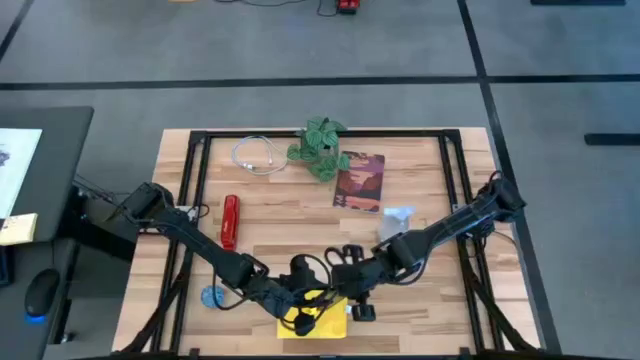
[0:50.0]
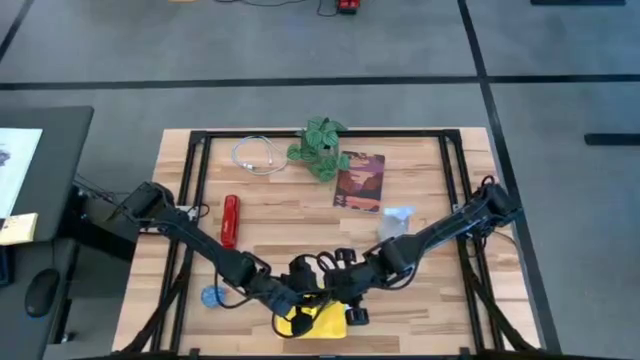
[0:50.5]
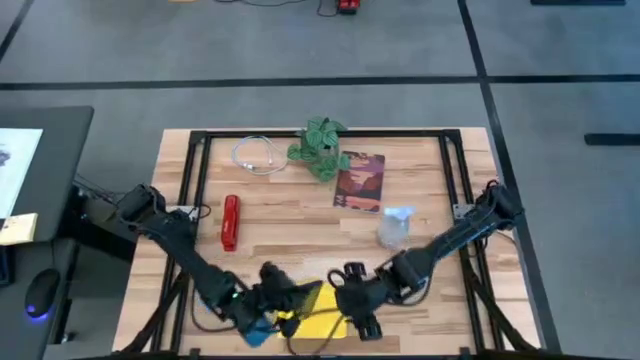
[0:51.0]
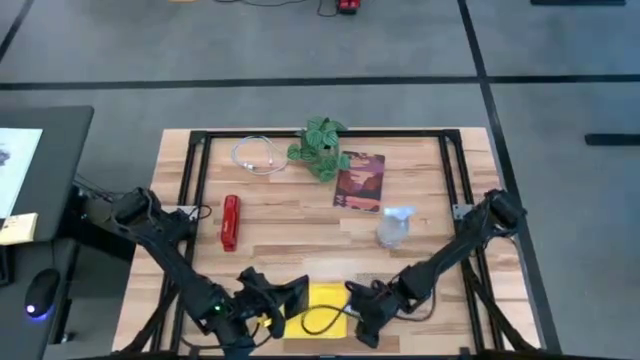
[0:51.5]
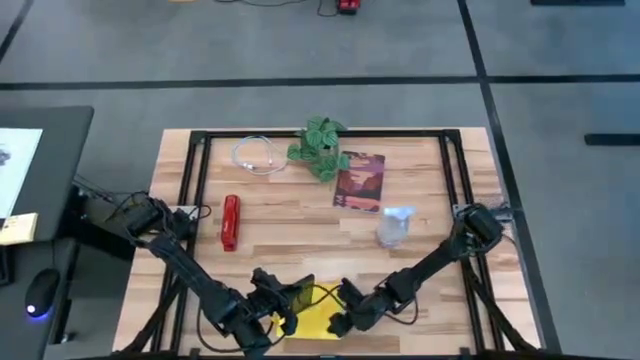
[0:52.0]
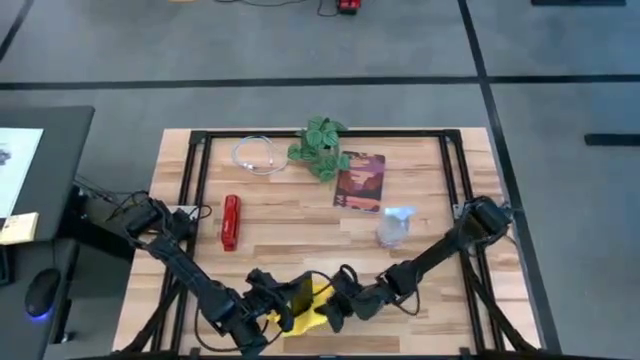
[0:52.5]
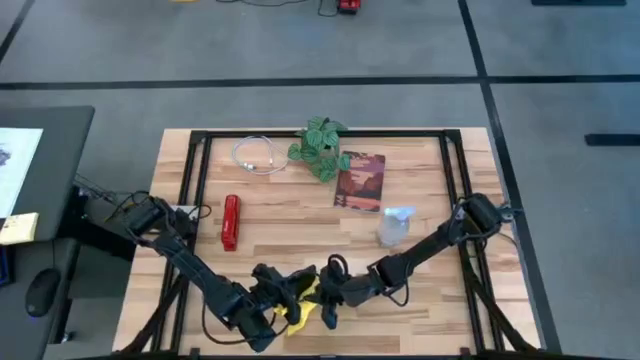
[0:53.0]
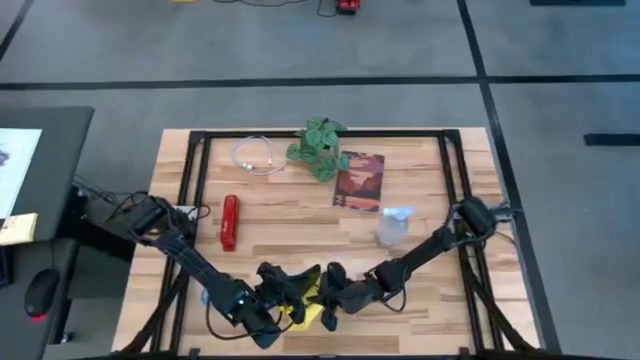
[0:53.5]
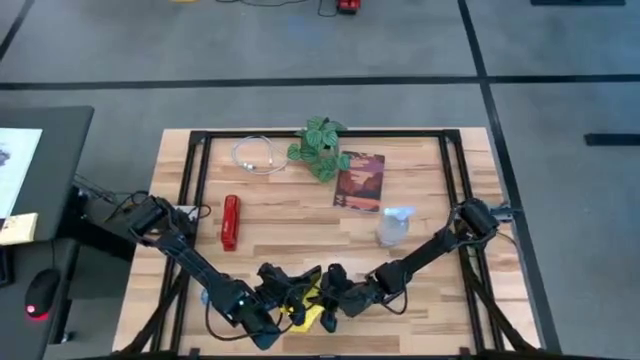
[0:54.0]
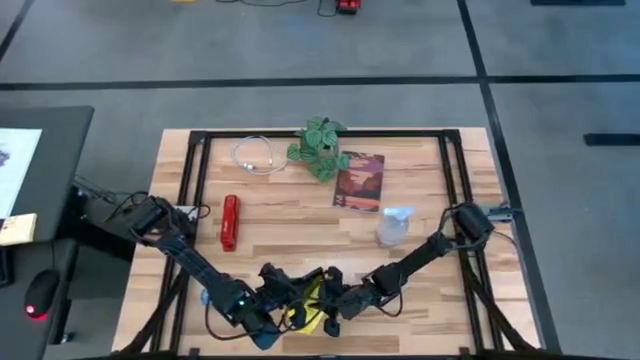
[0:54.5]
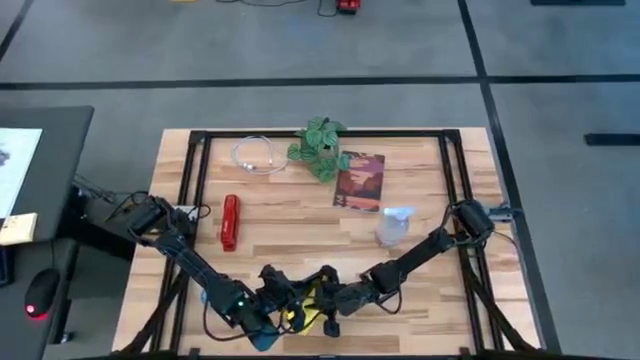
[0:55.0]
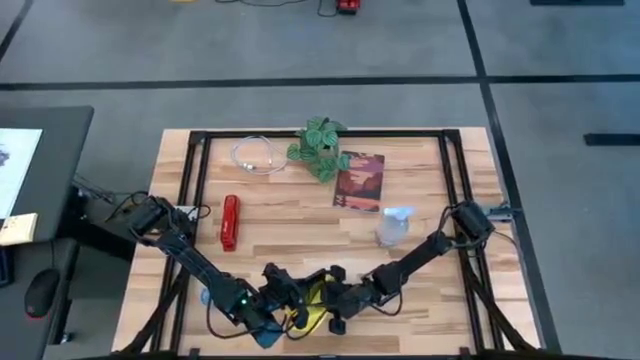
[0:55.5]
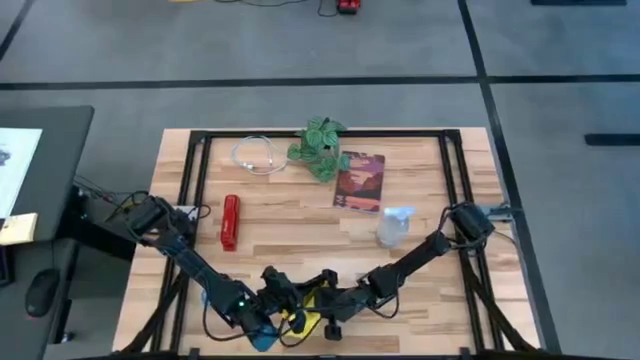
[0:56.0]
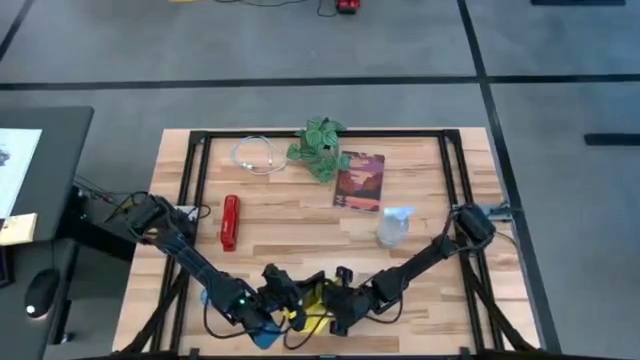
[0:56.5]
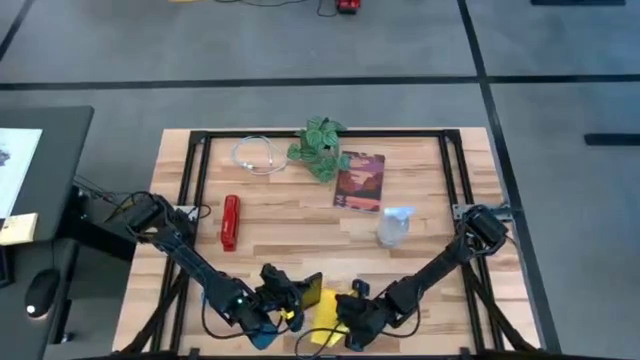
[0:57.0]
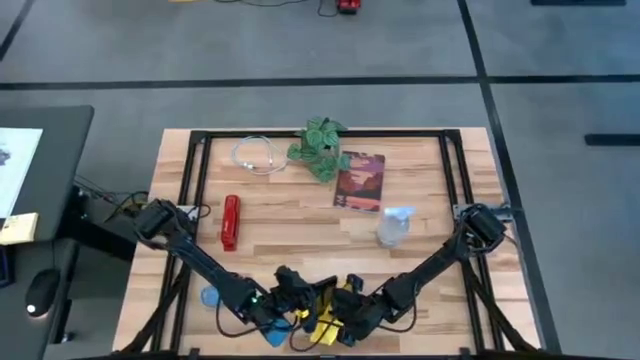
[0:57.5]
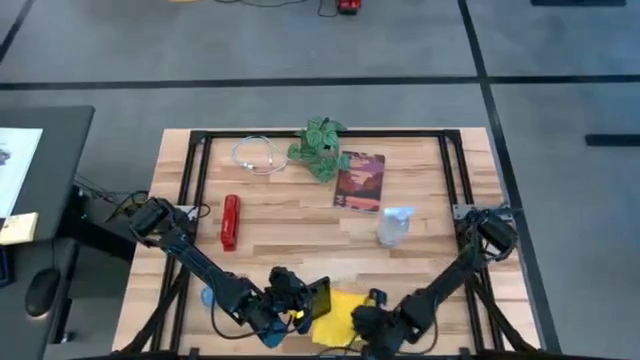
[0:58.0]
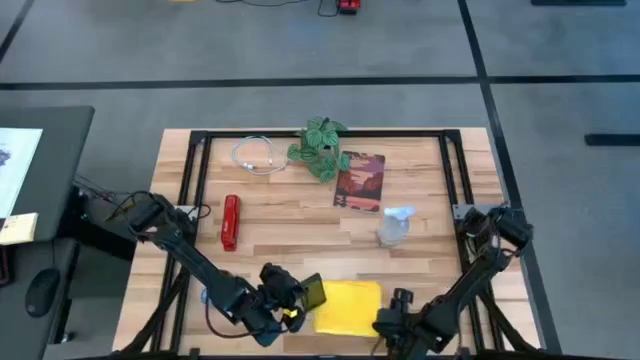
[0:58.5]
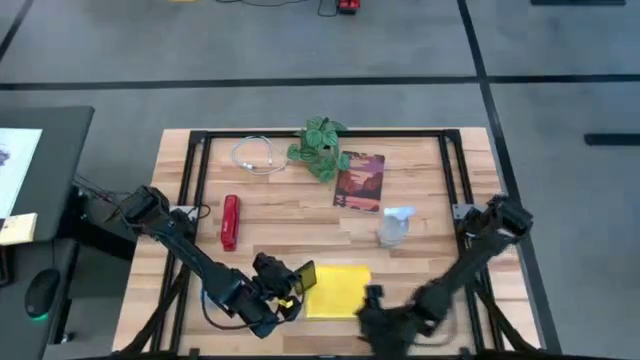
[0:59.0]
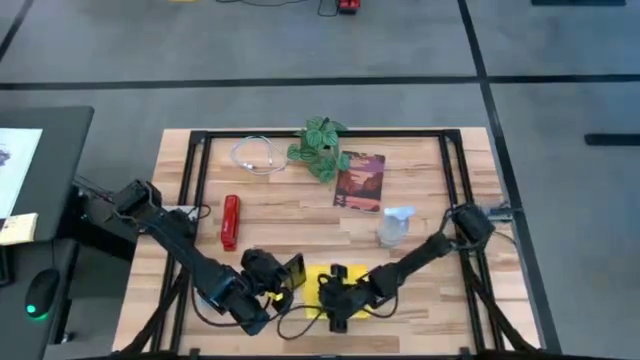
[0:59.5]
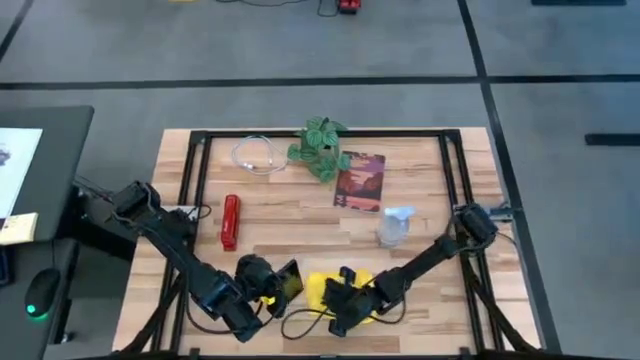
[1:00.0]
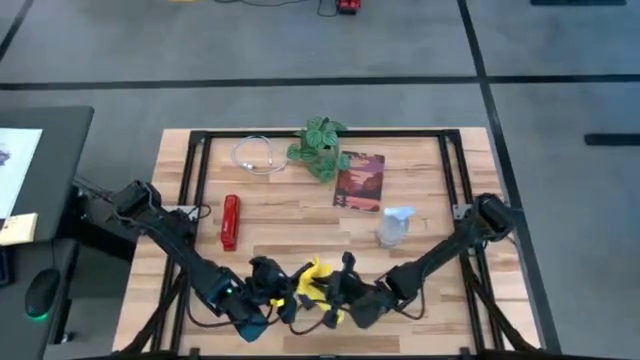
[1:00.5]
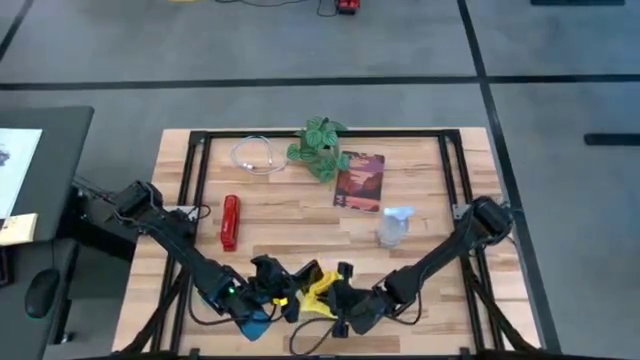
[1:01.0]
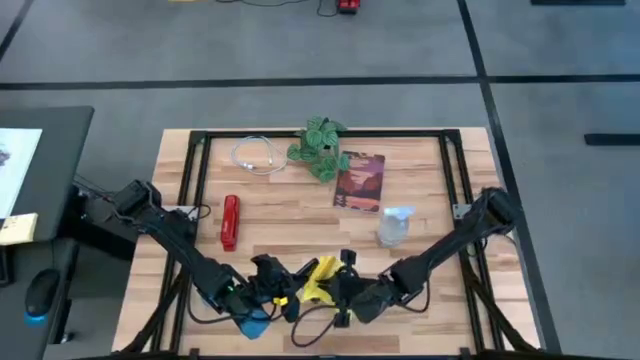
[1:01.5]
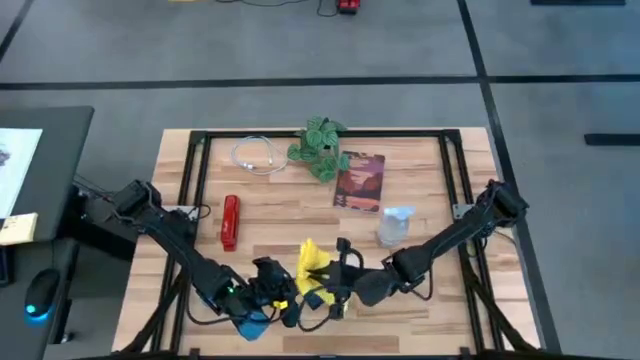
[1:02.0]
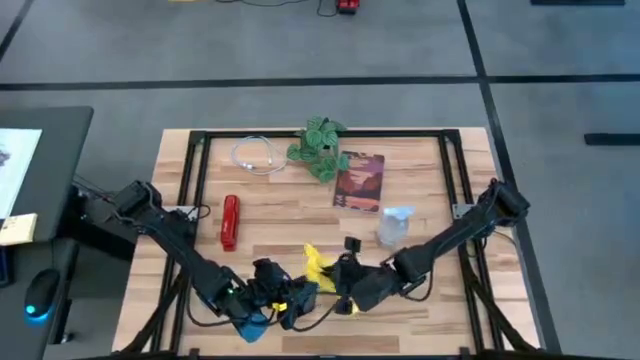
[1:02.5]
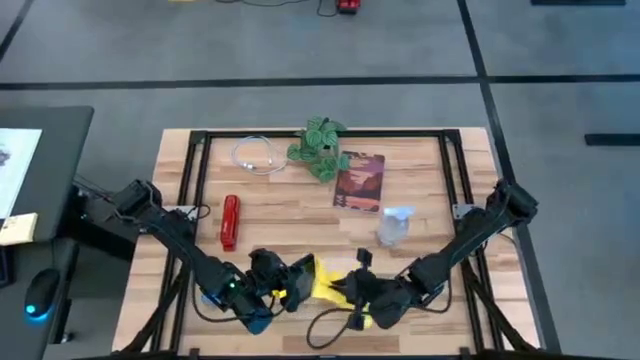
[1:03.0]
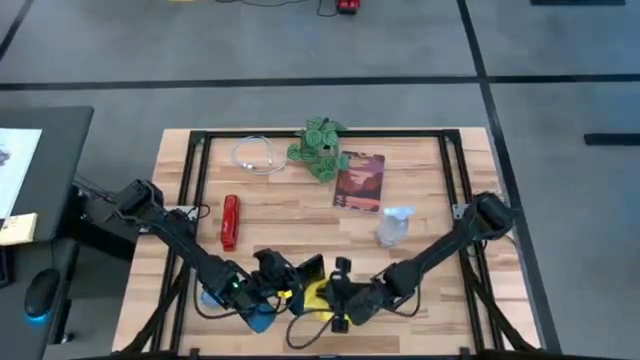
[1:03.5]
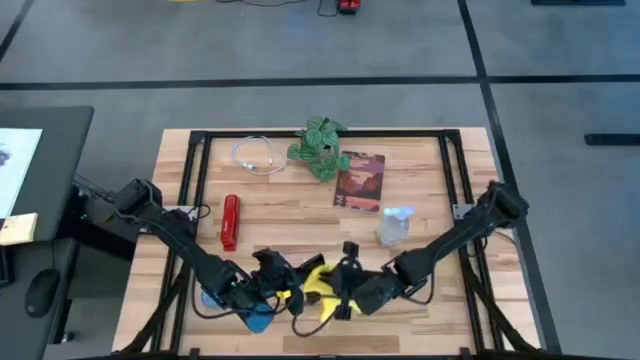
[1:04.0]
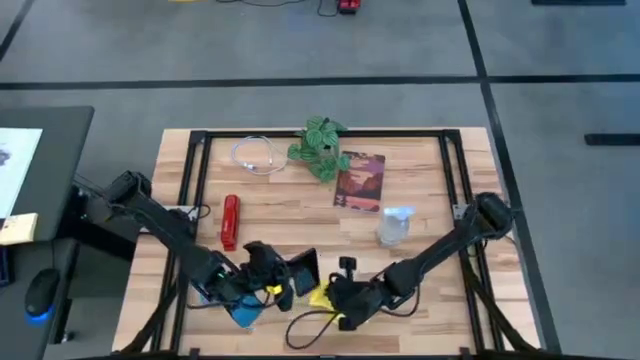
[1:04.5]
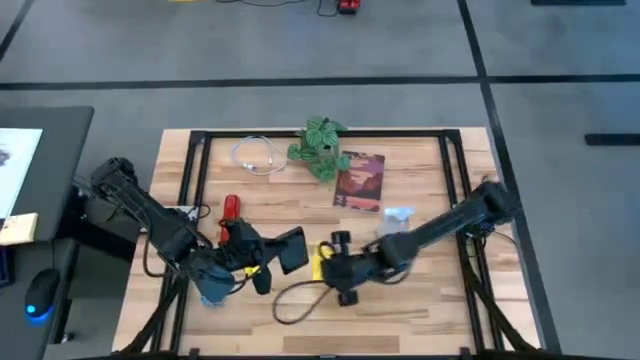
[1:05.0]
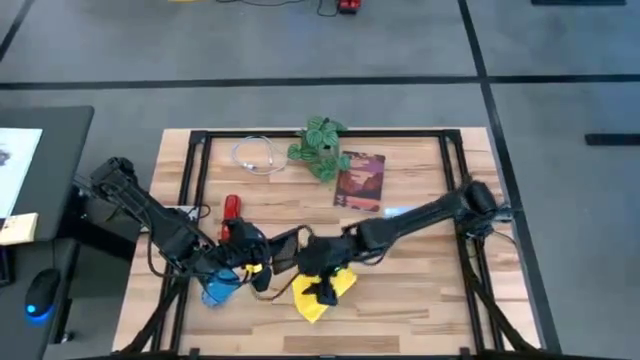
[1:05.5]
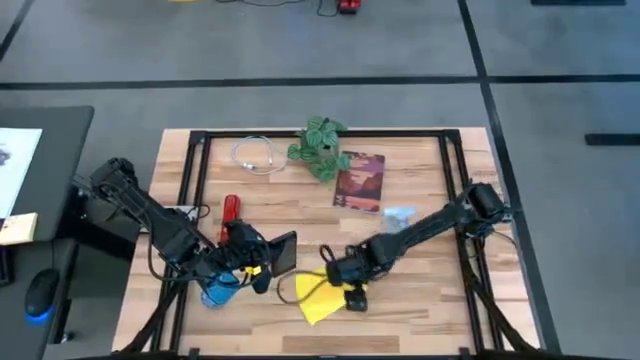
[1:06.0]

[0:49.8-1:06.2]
Task: Apply microfiber cloth
Wipe the front of the cellphone using the microfiber cloth

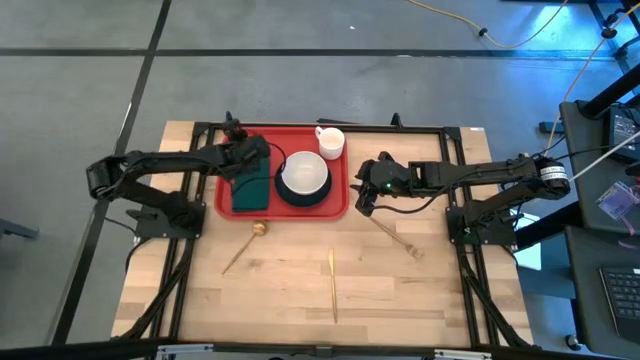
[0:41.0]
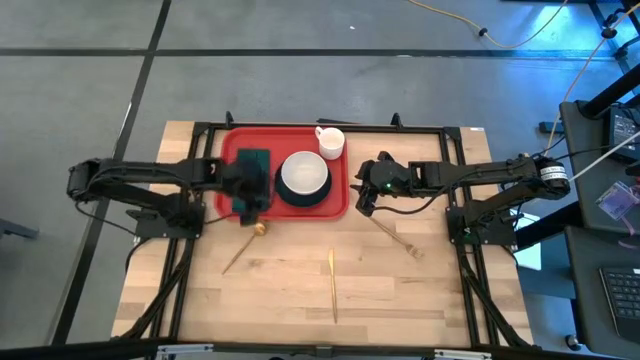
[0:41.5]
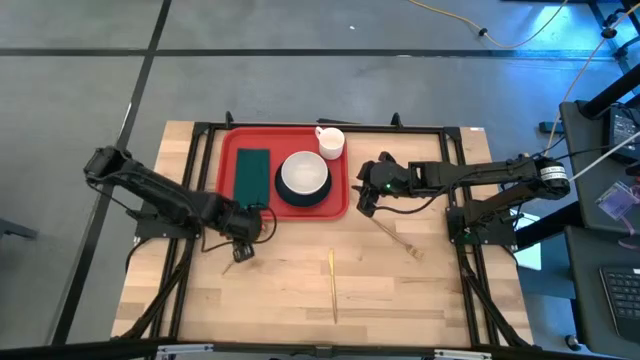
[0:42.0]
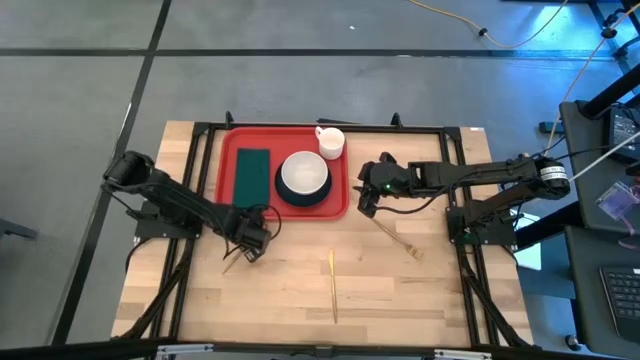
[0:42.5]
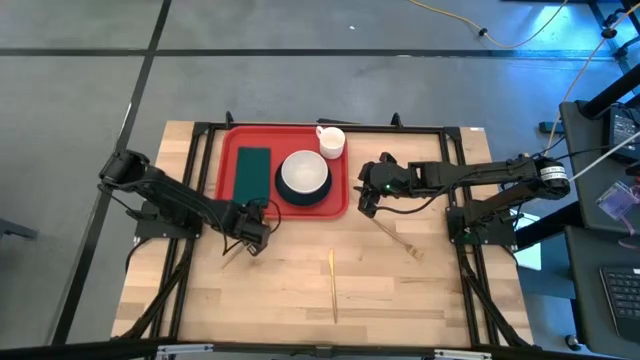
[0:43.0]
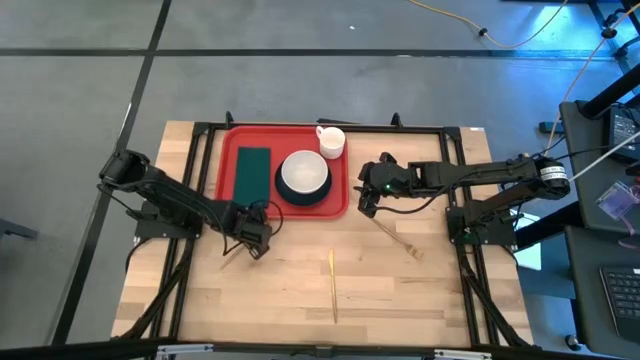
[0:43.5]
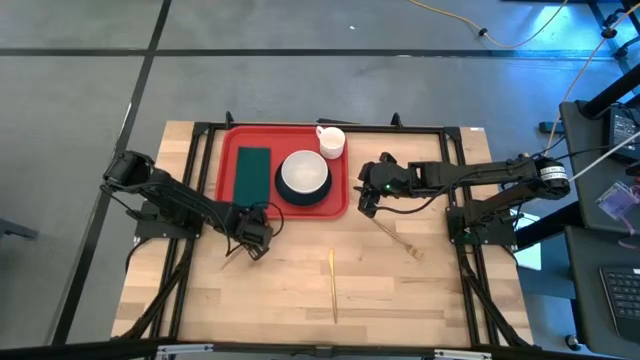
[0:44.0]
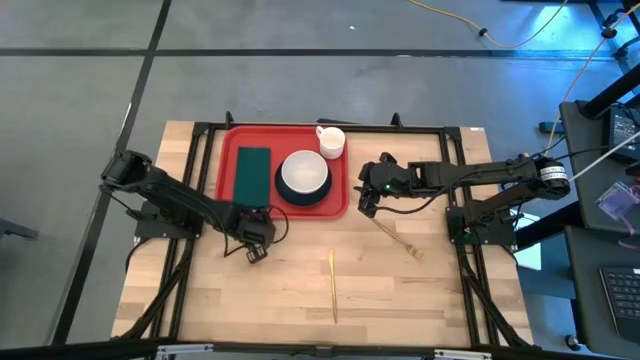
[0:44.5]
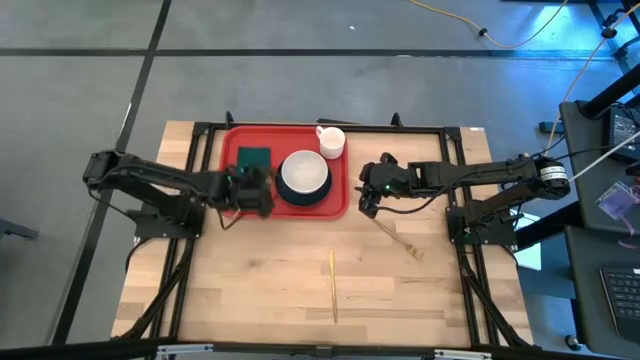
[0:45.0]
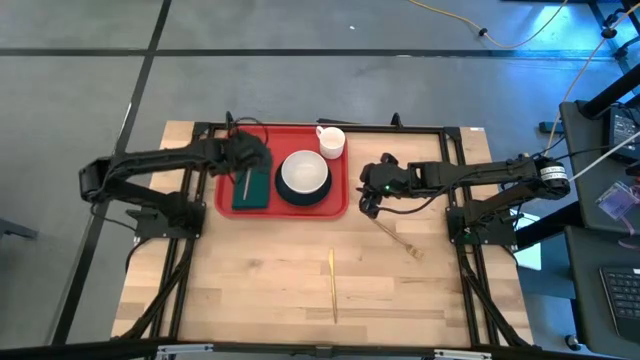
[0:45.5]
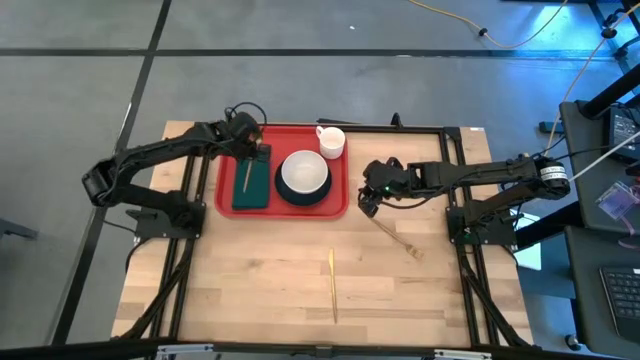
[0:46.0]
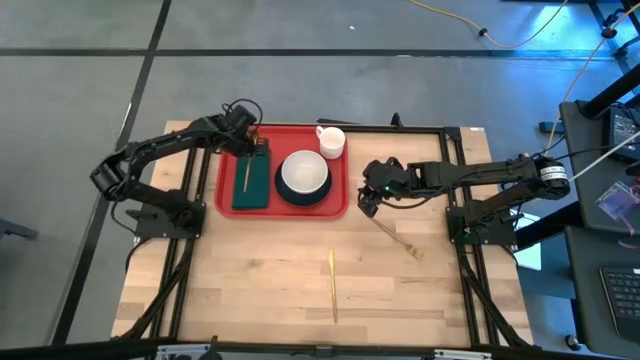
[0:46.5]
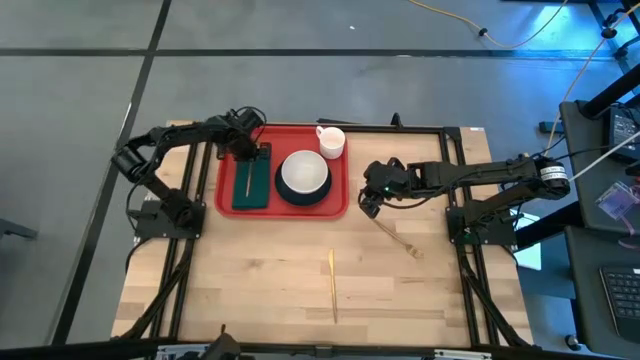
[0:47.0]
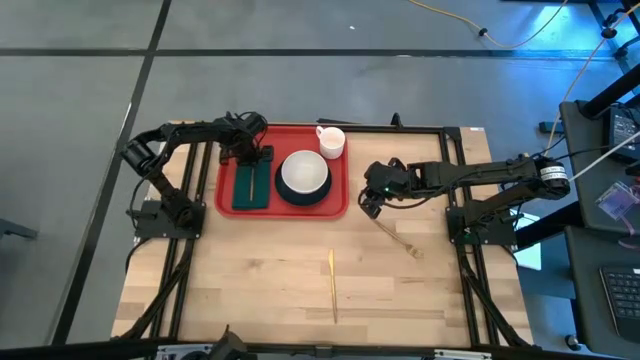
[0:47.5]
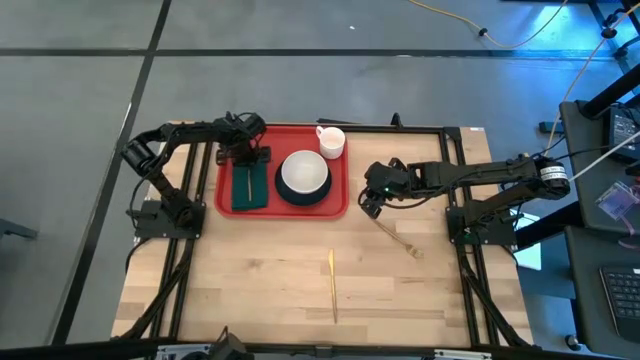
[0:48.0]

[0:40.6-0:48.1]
Task: Set up tray
Put the gold spoon on the green napkin
